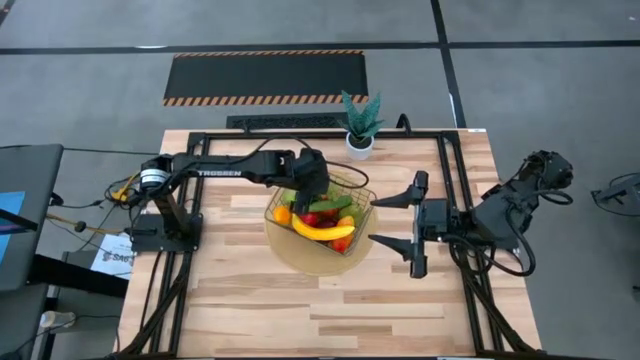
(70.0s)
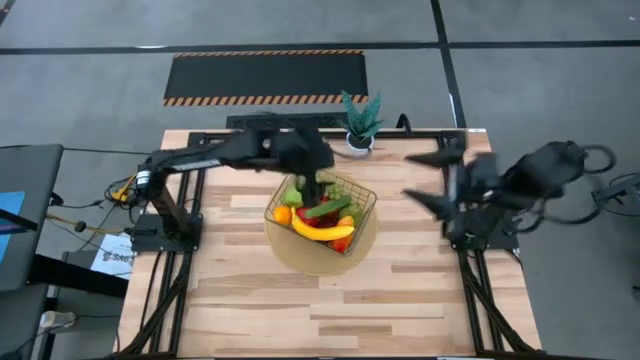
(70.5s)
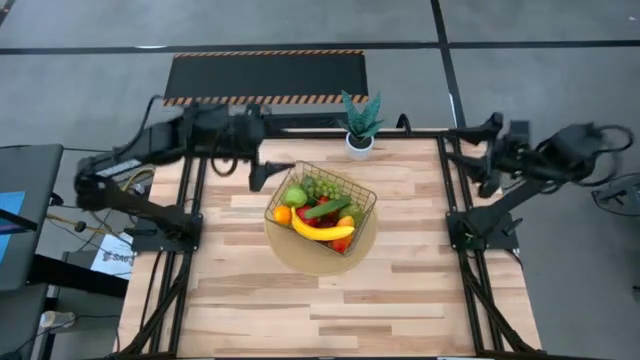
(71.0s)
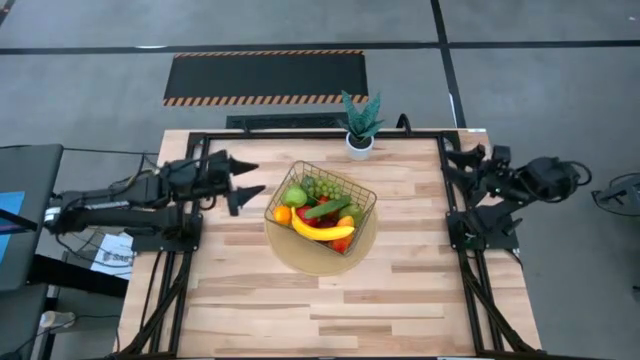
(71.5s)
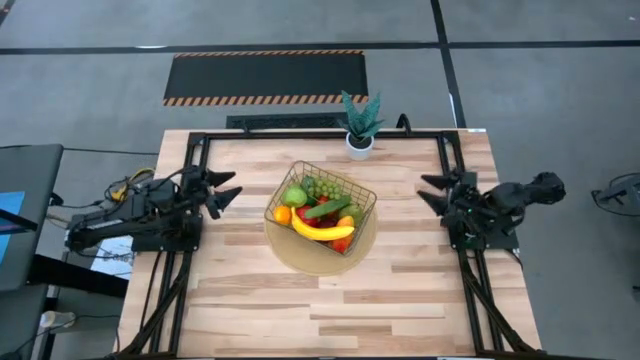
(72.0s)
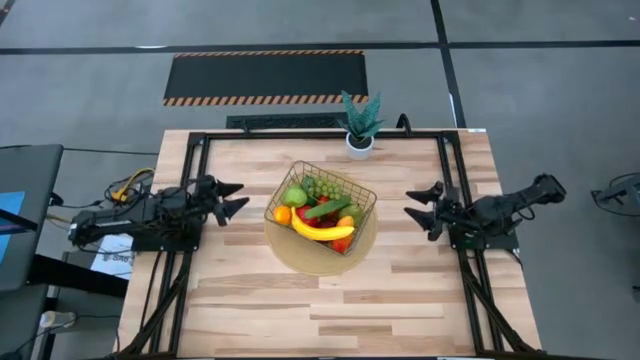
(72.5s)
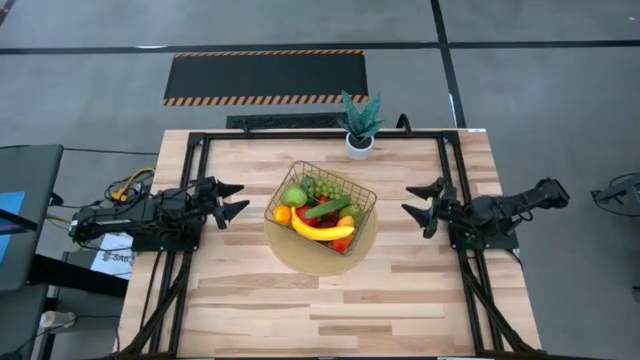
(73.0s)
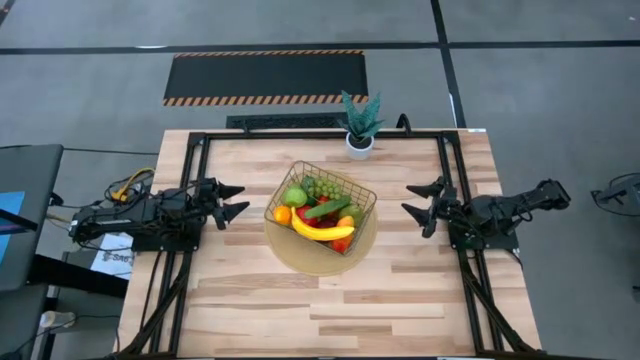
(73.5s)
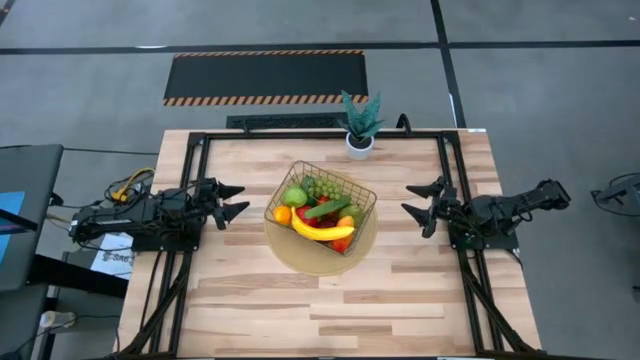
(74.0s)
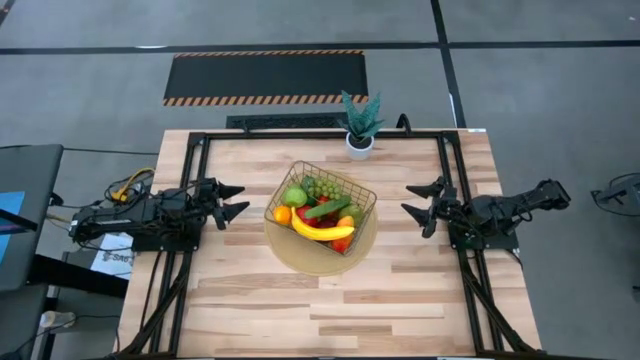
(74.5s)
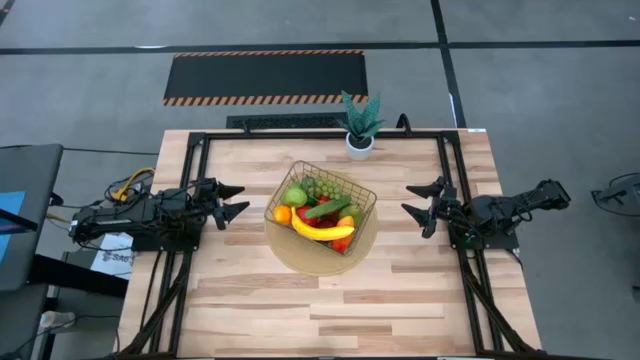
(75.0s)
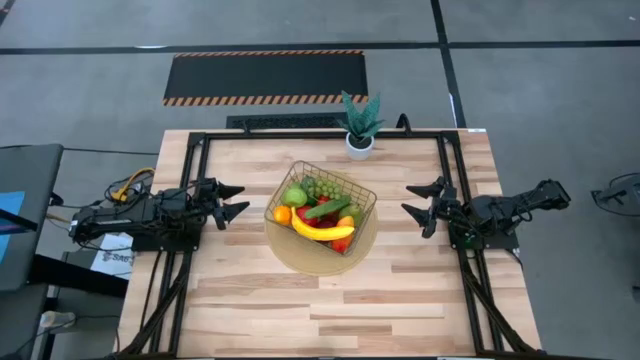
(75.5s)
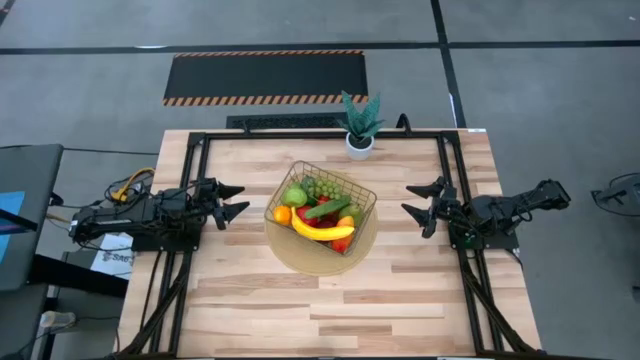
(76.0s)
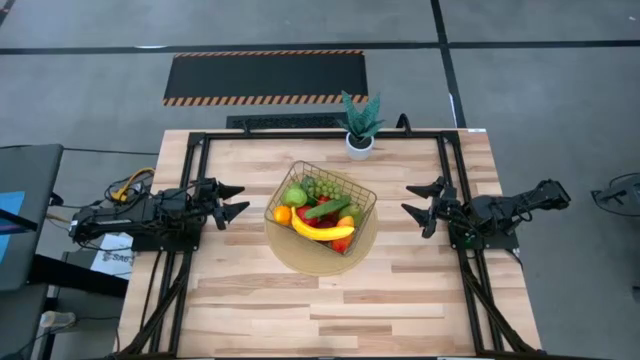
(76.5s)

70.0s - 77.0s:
Task: Build produce basket
Return to Home Position

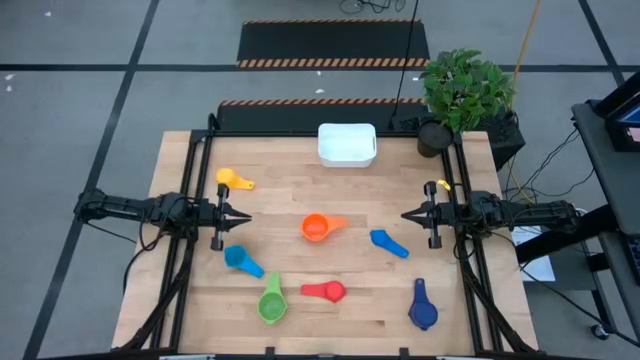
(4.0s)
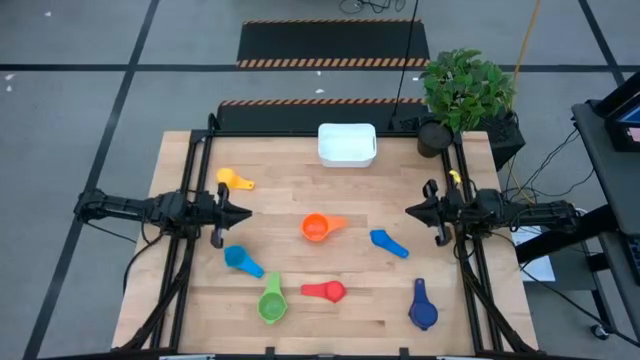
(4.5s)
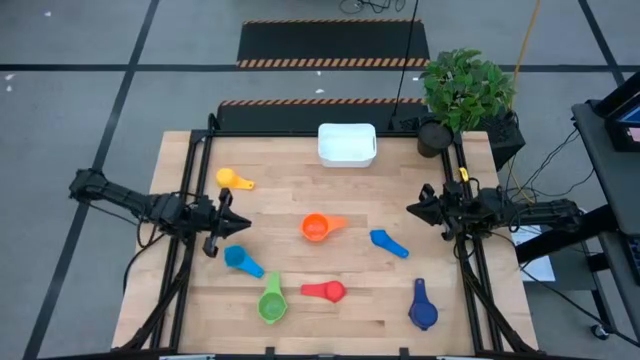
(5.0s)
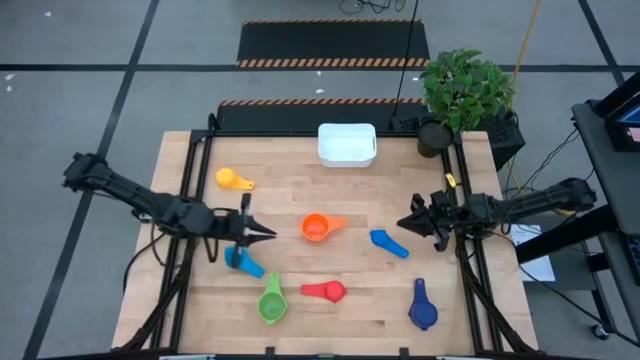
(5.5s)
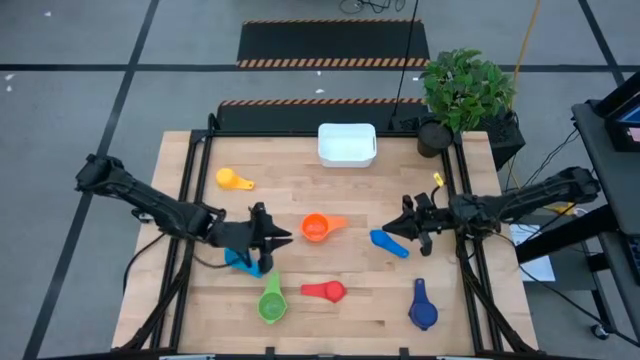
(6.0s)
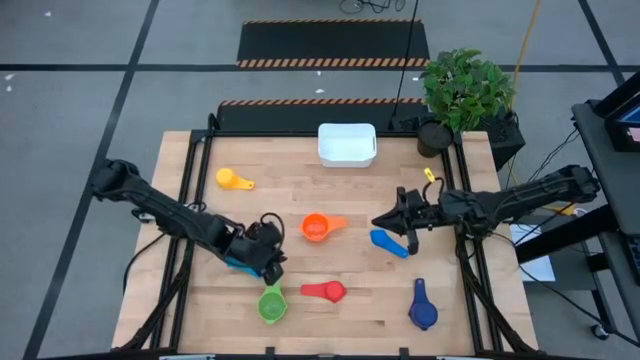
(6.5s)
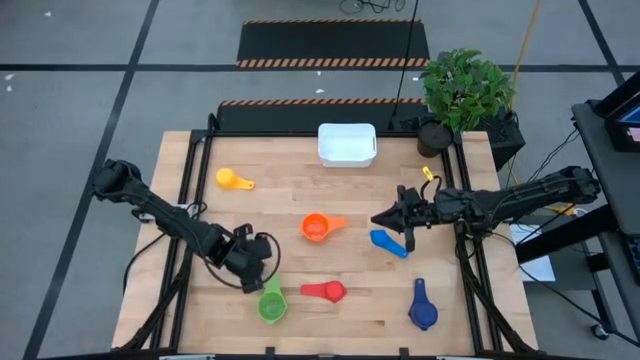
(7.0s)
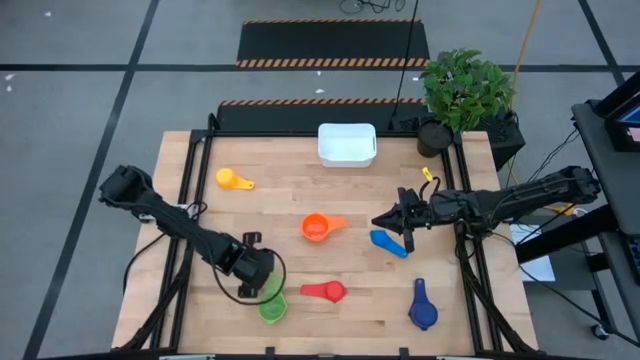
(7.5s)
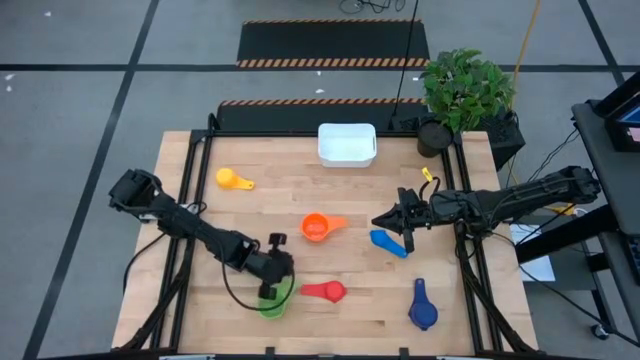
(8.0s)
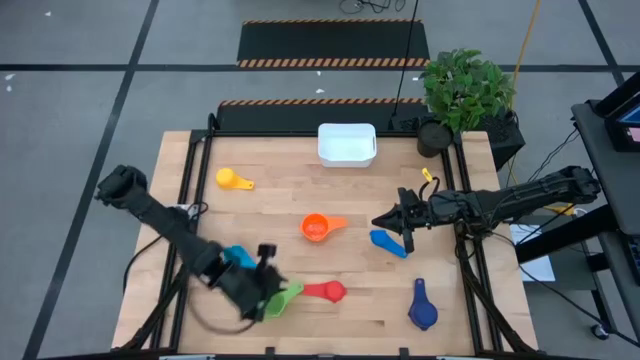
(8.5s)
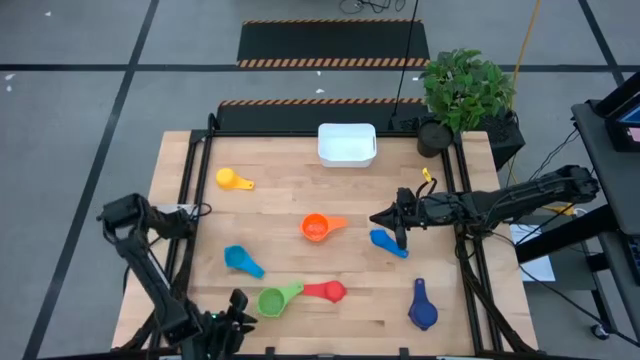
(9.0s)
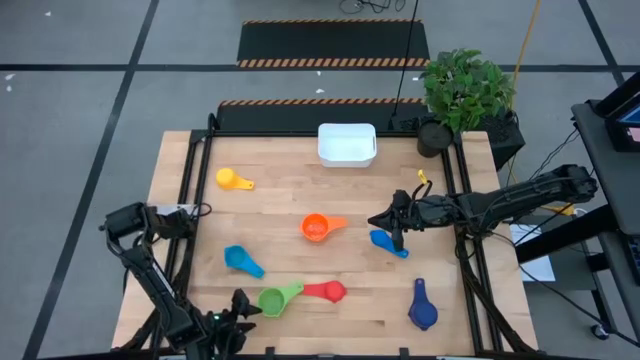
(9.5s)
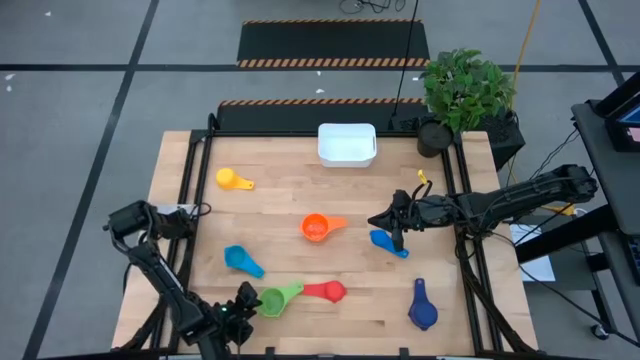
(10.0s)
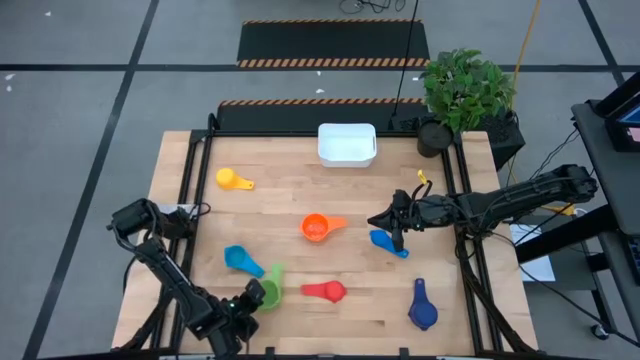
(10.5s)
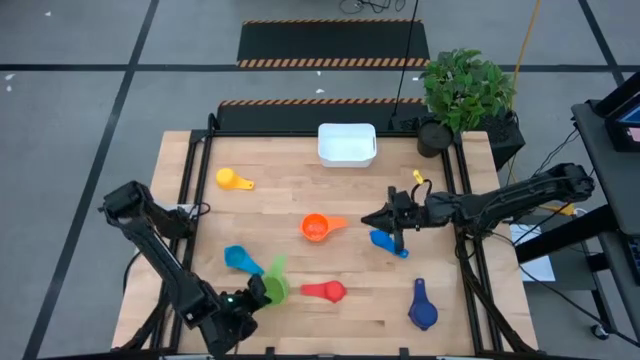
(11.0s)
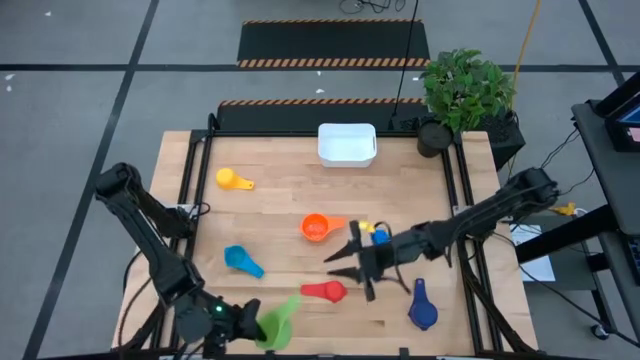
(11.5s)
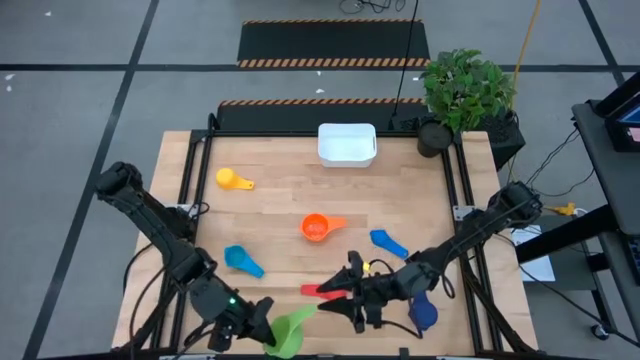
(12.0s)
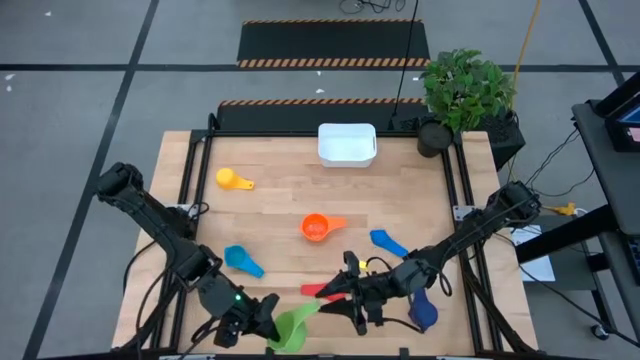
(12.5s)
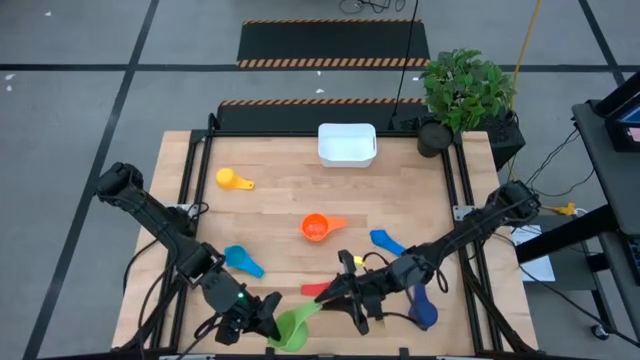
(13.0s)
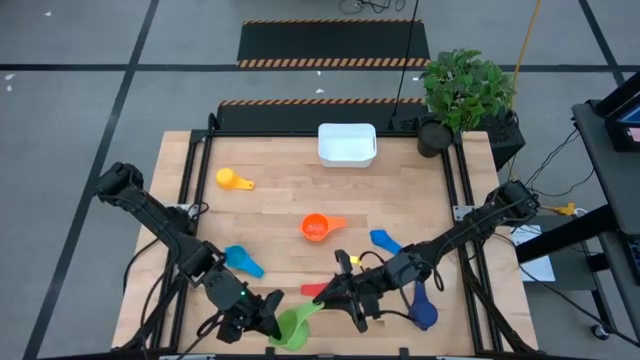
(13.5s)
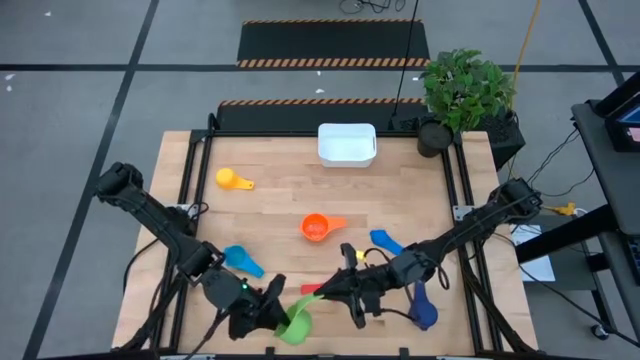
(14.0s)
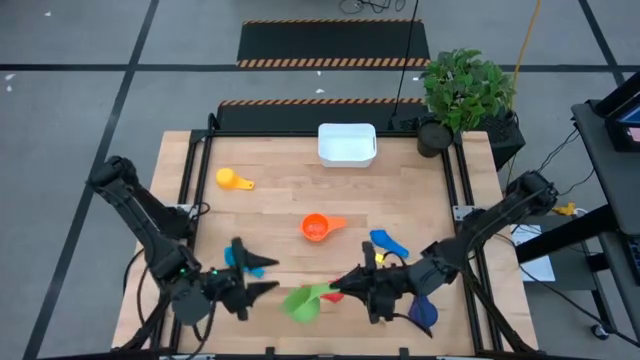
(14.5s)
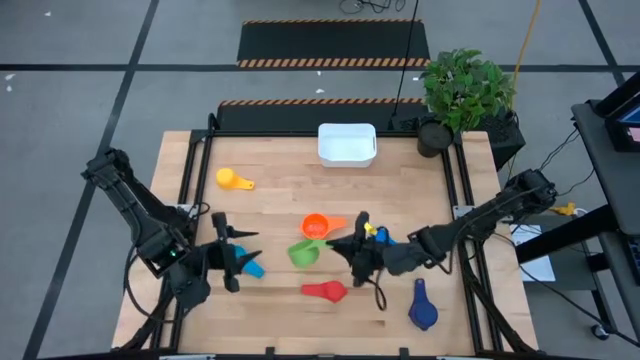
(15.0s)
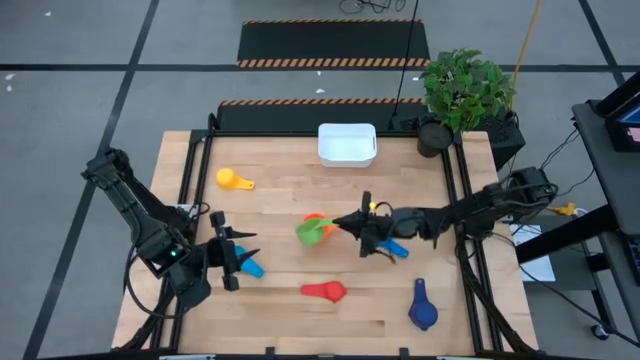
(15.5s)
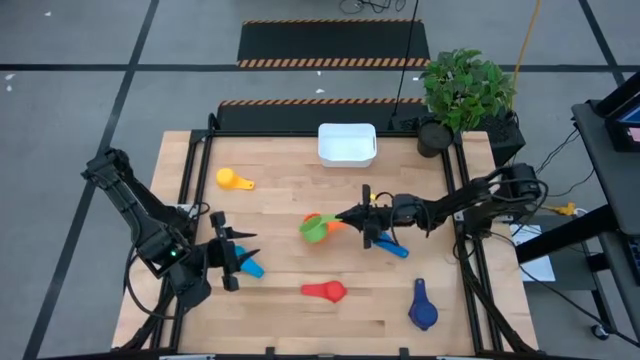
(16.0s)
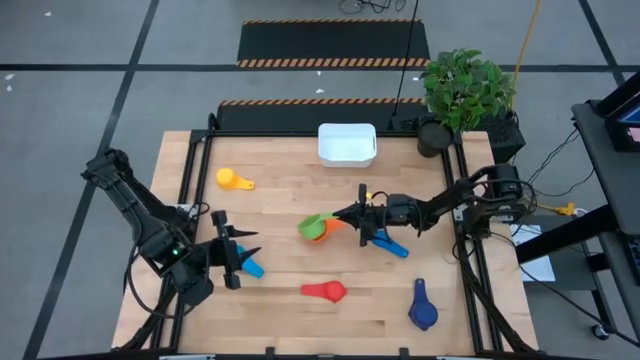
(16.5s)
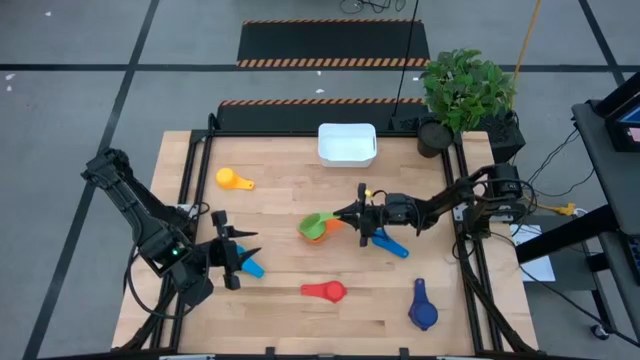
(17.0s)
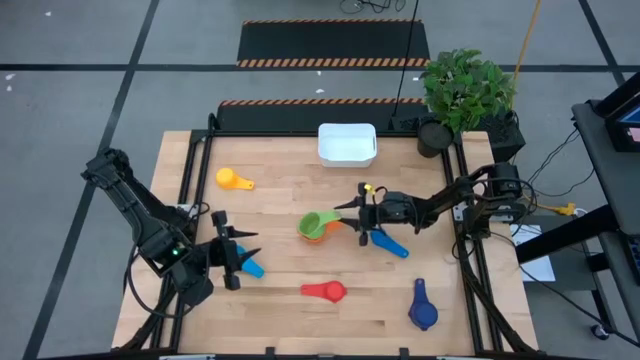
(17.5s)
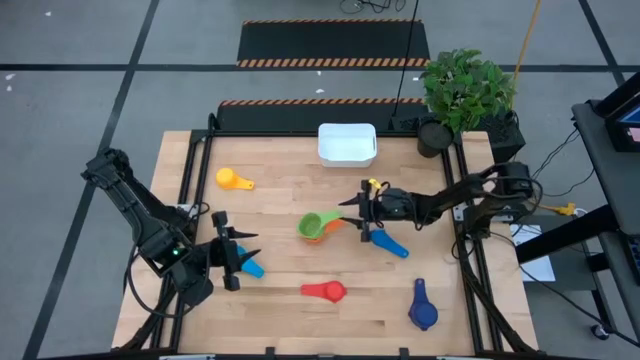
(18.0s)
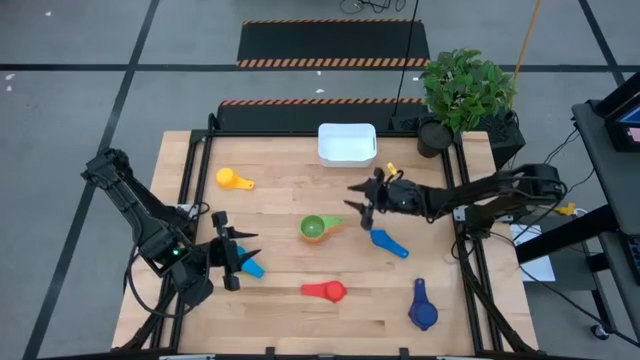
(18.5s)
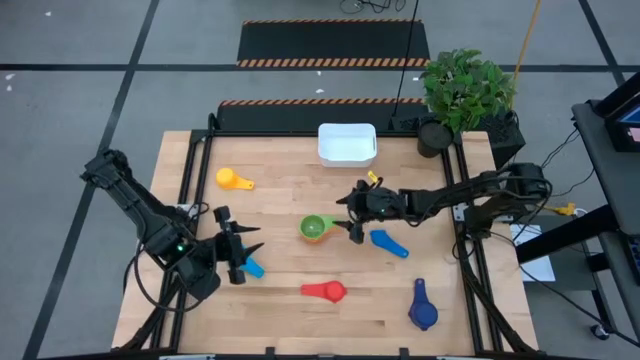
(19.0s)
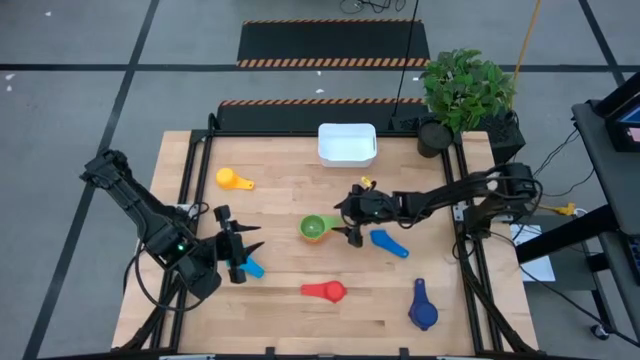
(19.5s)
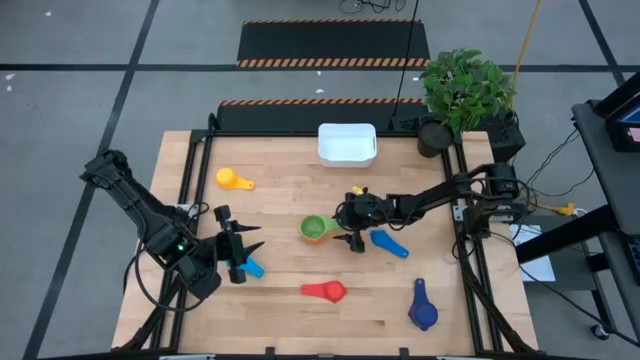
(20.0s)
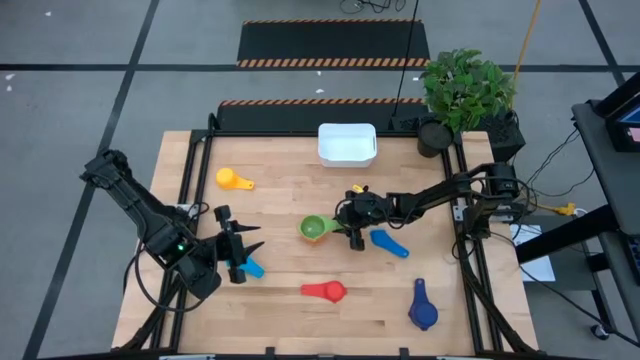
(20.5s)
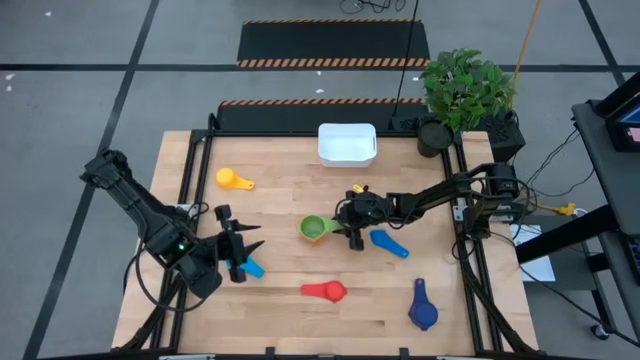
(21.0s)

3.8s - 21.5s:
Task: Nest measuring cups in basket
Stack the green measuring cup into the orange measuring cup
